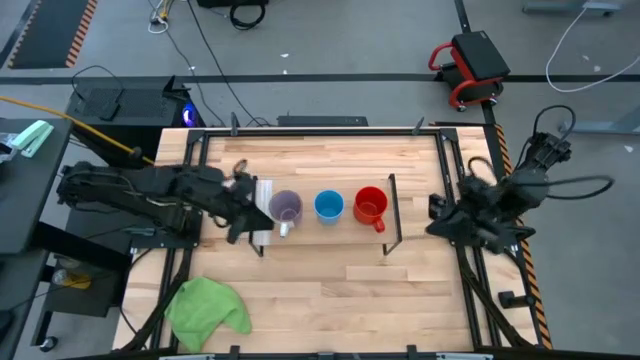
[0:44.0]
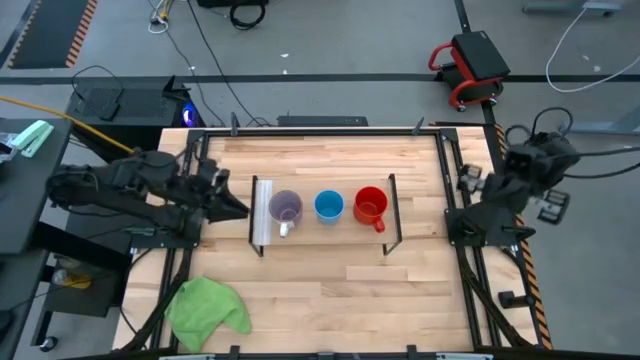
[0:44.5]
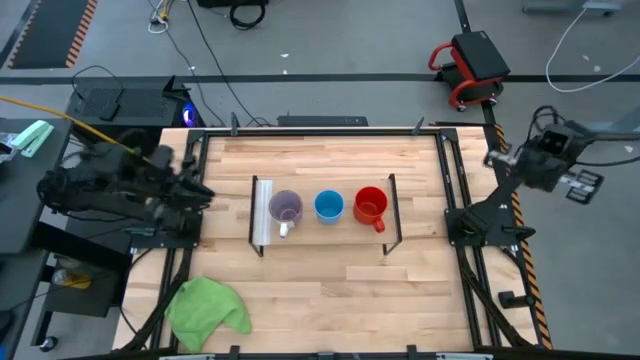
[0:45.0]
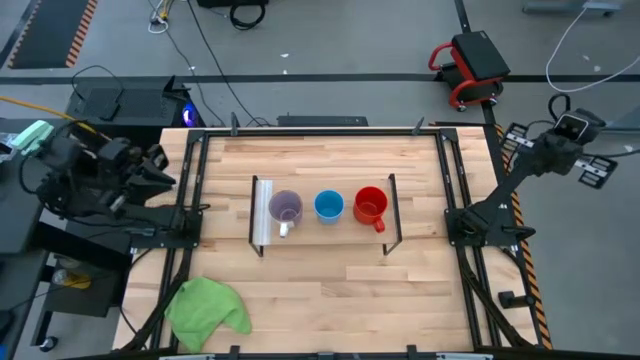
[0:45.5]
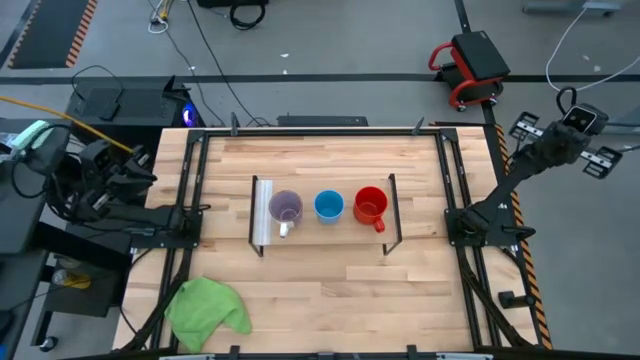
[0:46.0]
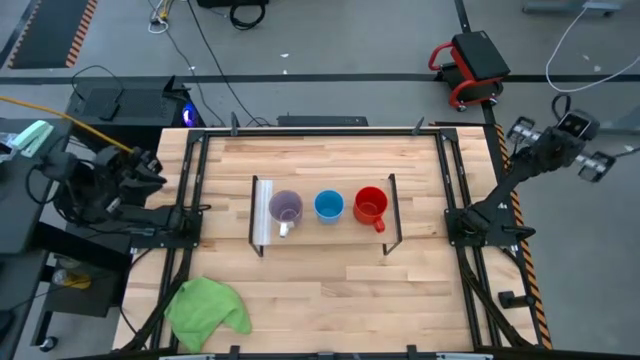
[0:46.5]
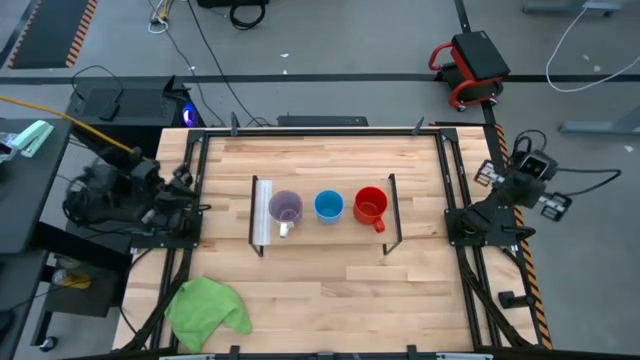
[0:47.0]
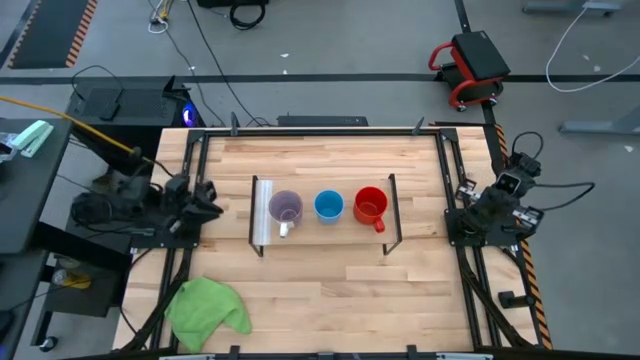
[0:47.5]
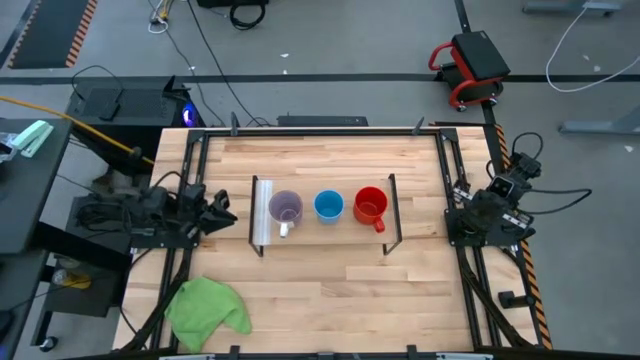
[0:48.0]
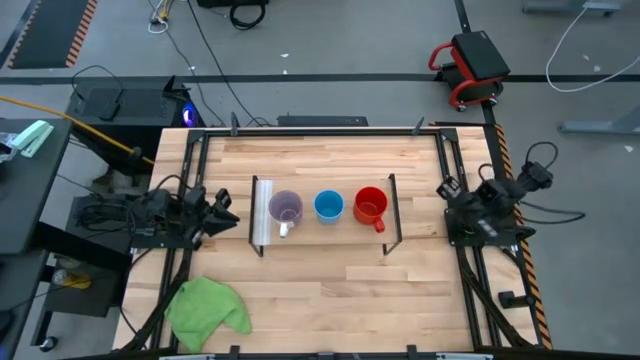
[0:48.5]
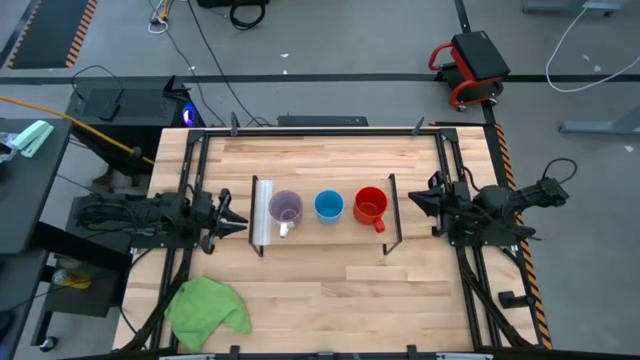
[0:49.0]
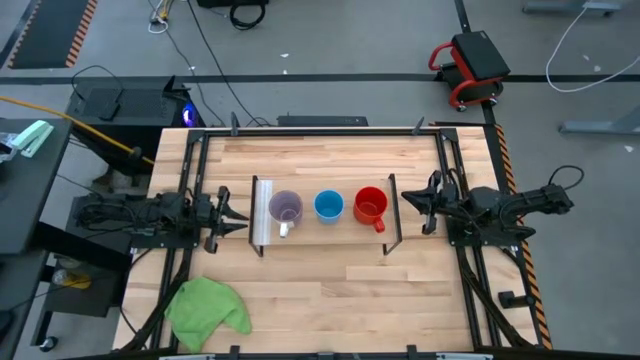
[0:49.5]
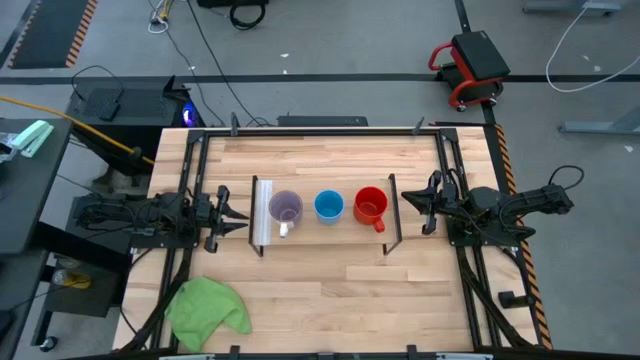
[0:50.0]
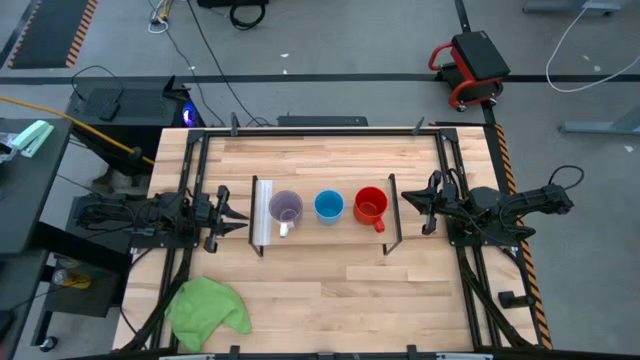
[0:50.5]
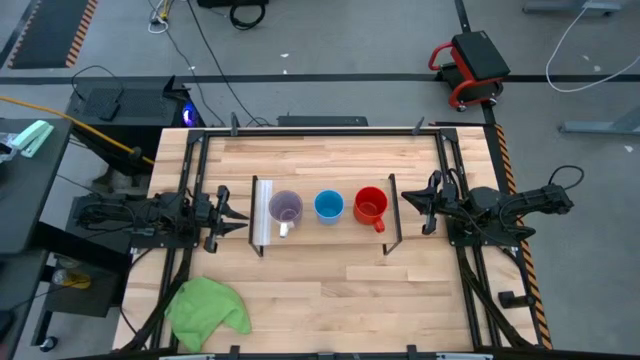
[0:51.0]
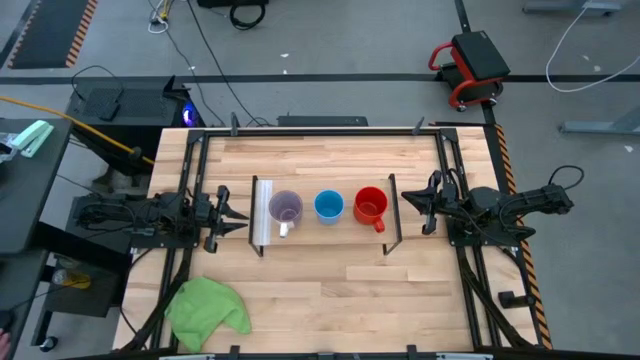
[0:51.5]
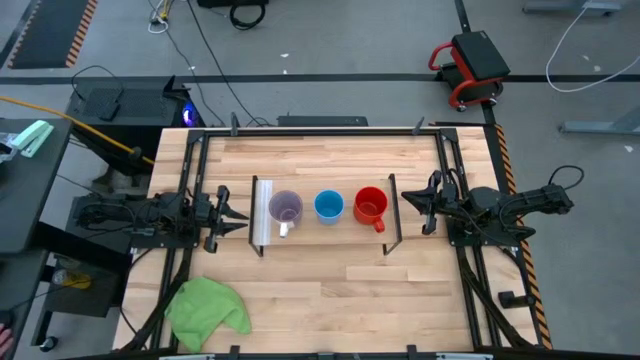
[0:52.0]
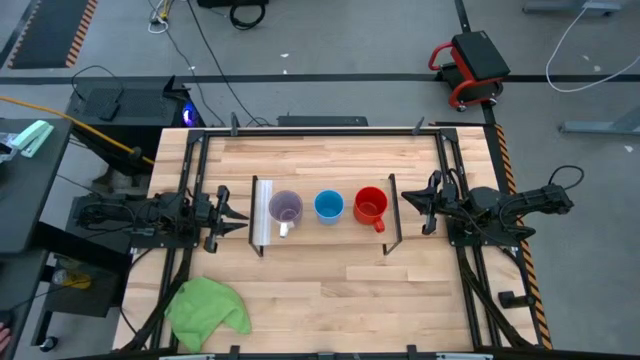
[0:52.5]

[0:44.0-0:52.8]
Task: Stack small to large cups/mugs on shelf
Return to home position

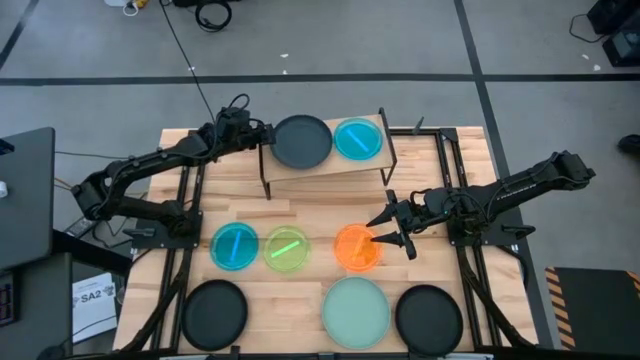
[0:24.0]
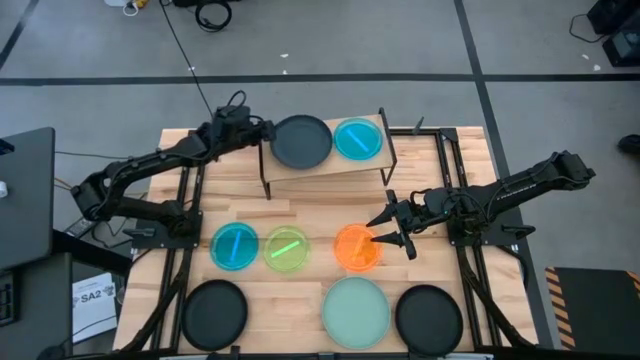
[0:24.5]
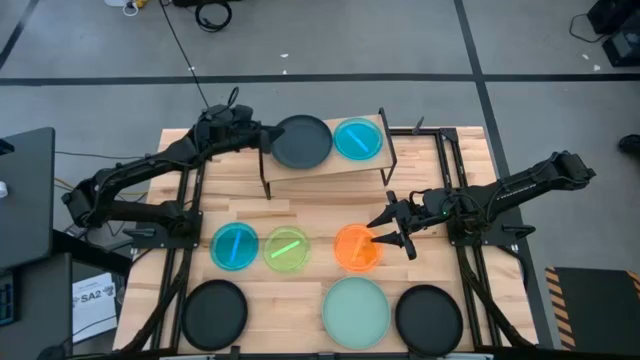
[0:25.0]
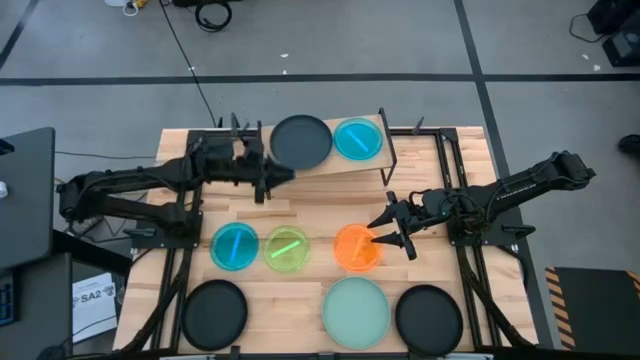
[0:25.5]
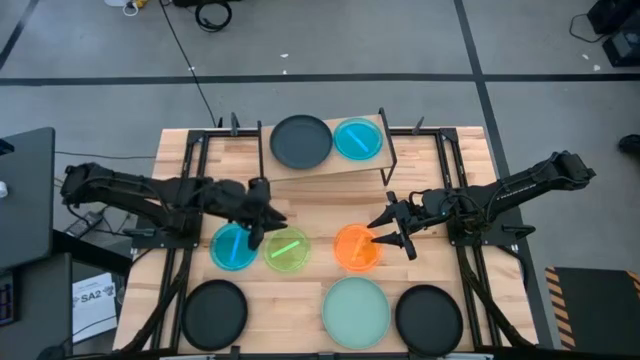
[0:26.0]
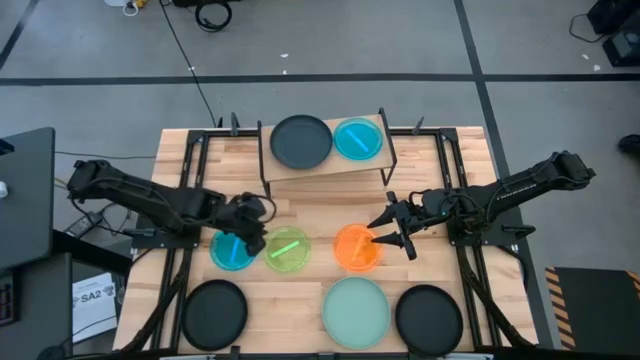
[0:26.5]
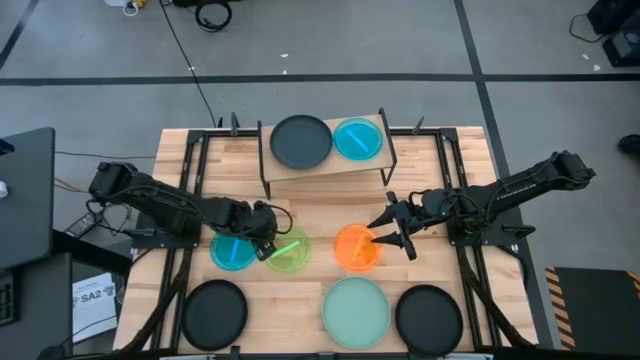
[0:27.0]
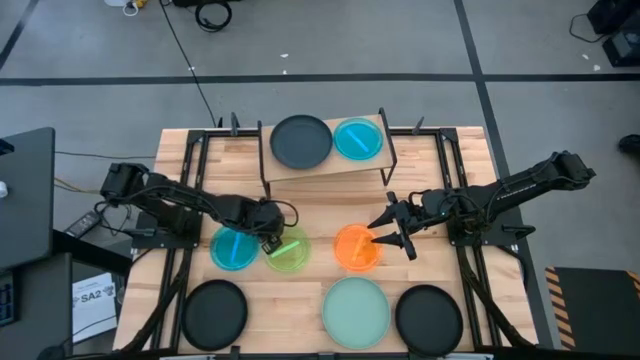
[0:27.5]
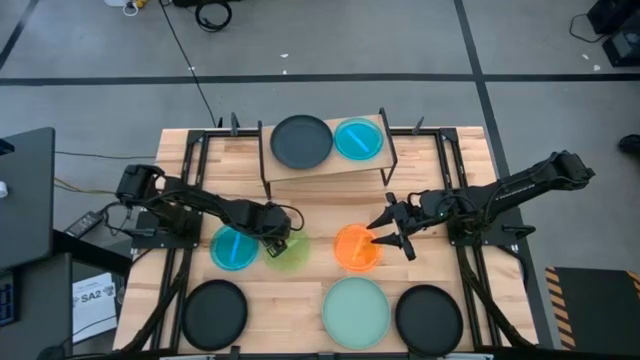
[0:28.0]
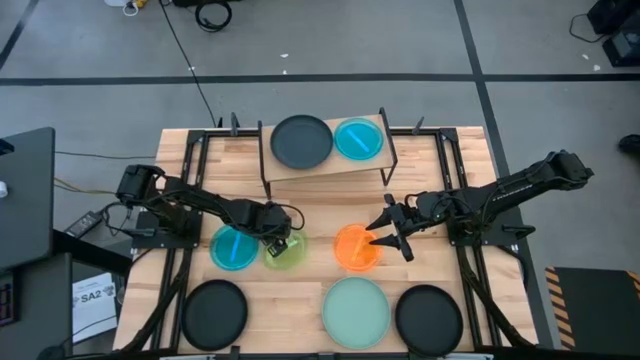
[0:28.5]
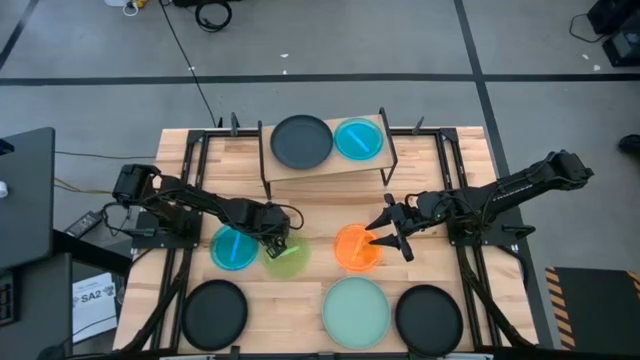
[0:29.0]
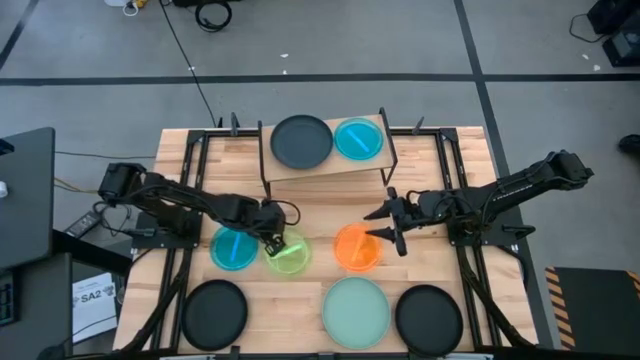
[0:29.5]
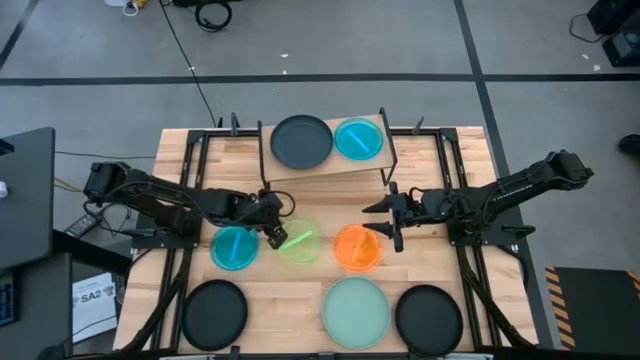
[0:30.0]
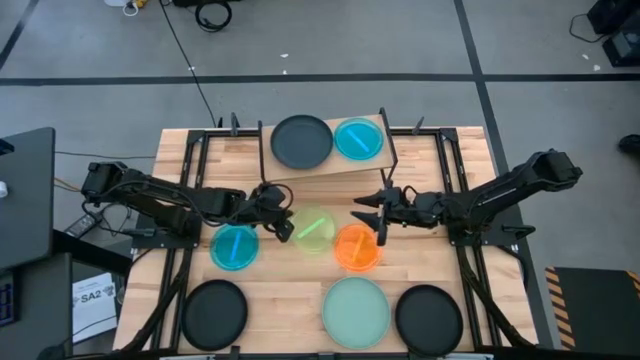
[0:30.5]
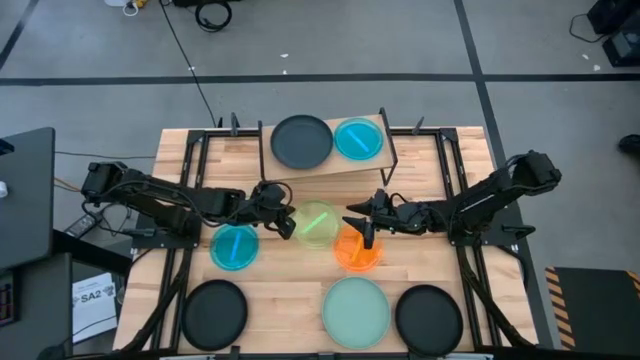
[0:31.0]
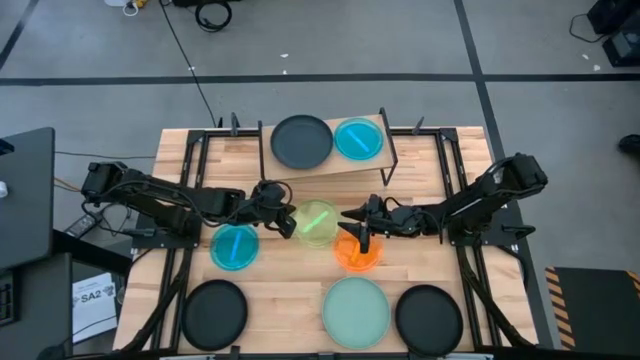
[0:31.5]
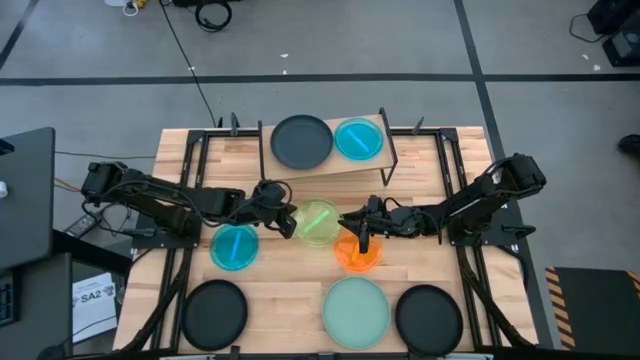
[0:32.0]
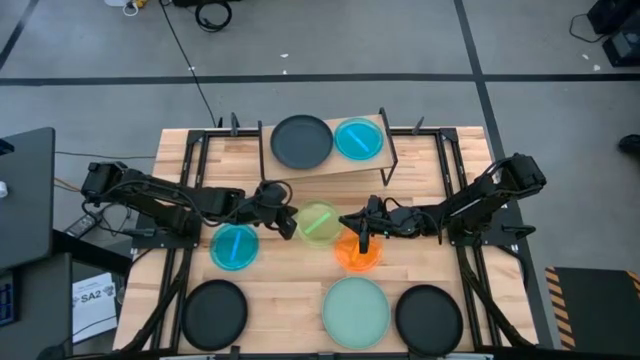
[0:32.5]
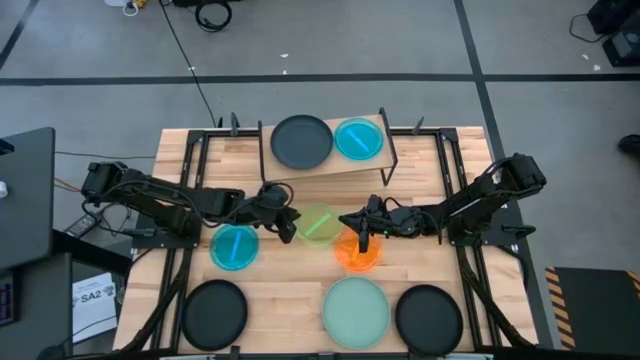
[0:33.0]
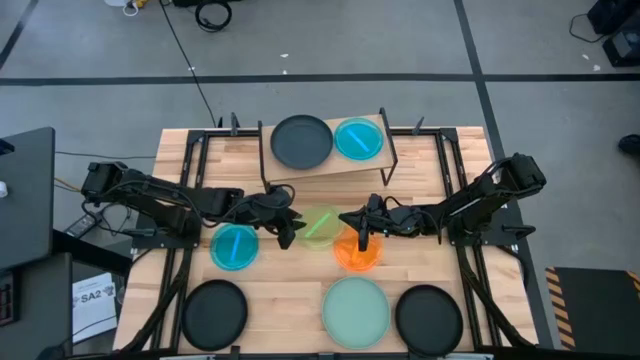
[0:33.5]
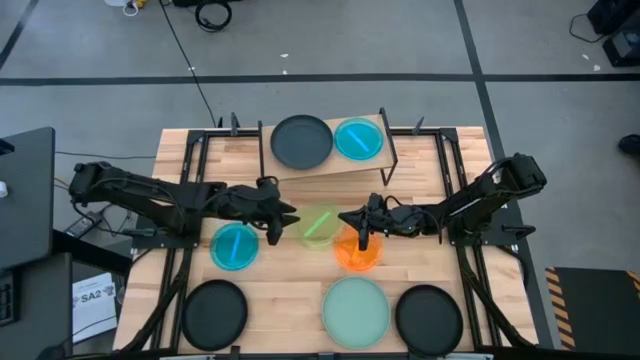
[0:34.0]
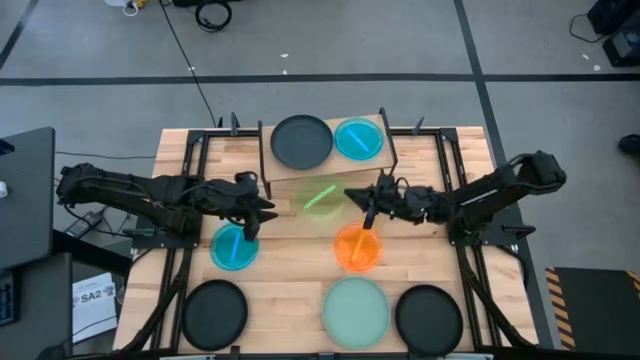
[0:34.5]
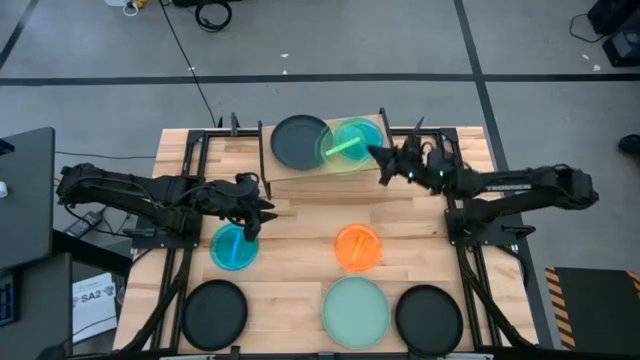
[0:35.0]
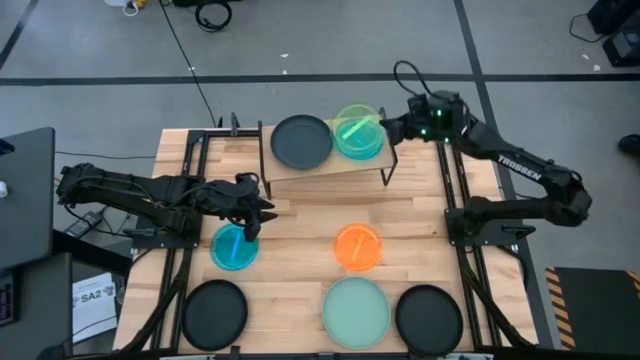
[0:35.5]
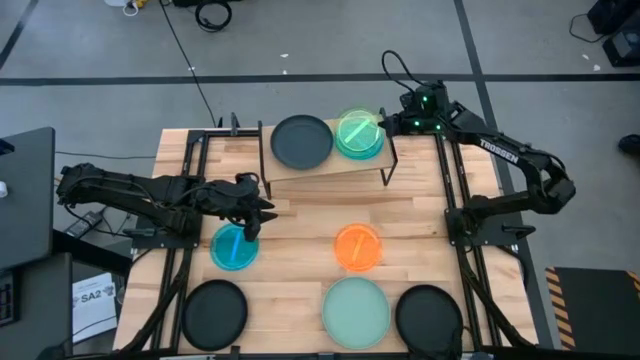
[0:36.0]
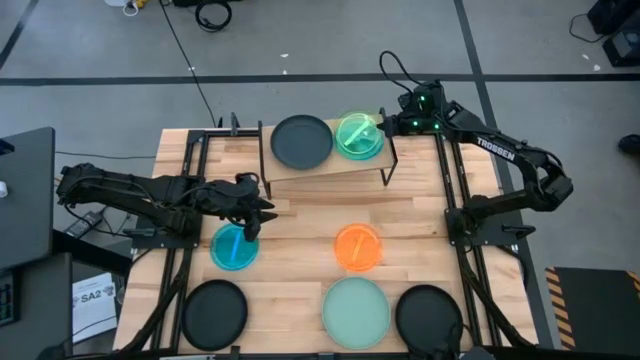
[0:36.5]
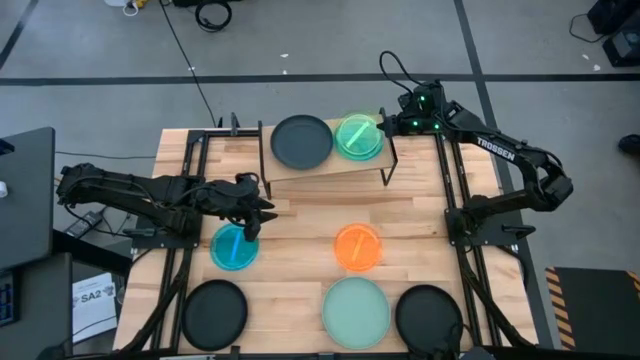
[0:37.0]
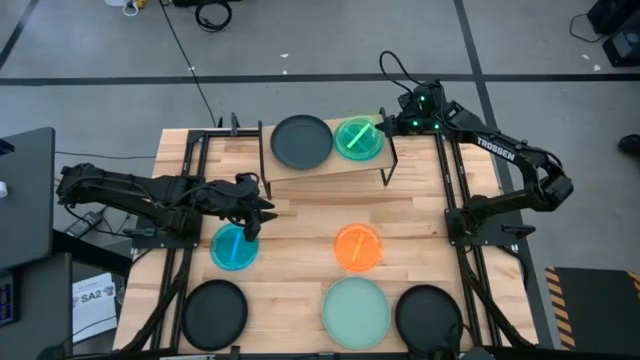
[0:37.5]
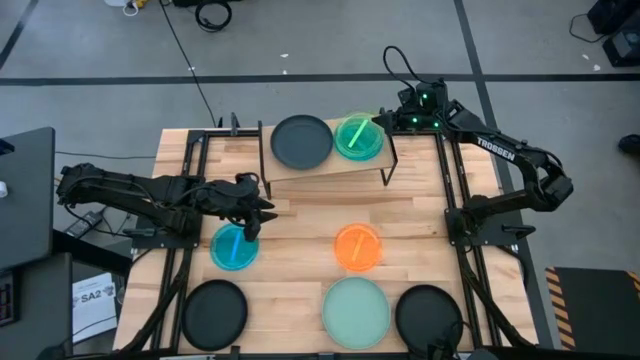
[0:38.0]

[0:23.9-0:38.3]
Task: Place and stack plates onto a shelf
Stack the green plate on top of the light blue plate on the shelf
